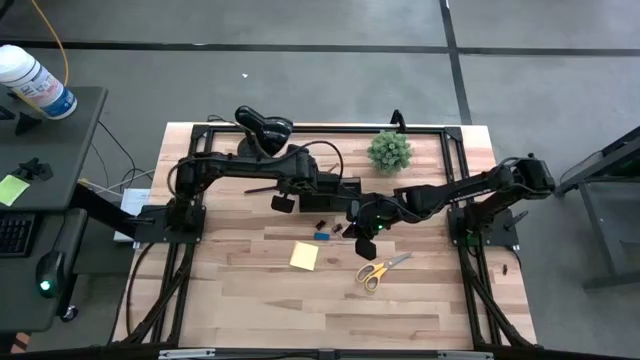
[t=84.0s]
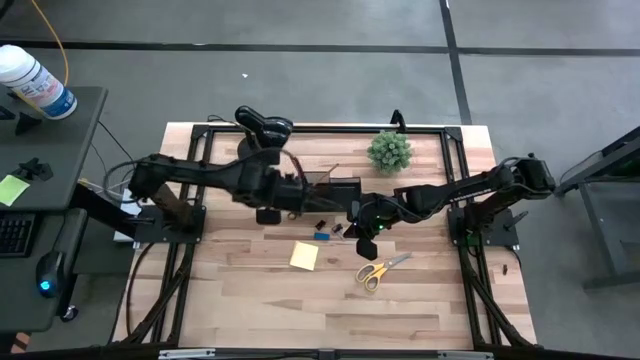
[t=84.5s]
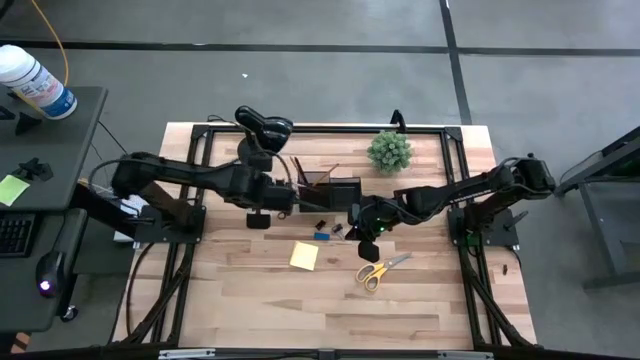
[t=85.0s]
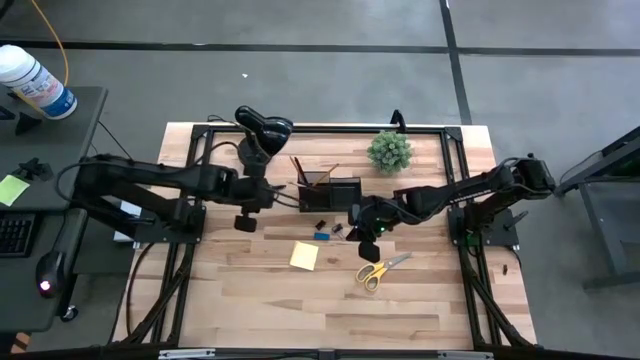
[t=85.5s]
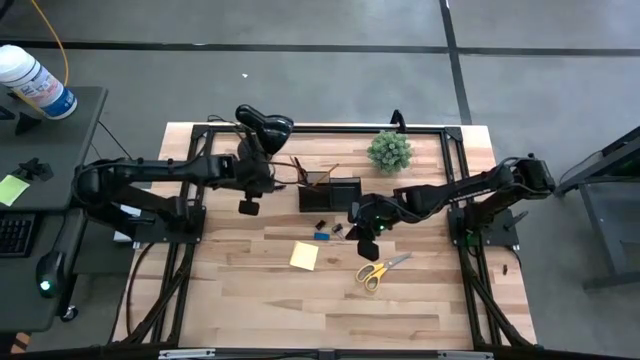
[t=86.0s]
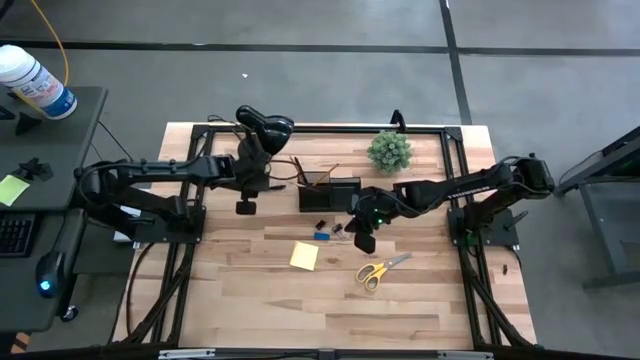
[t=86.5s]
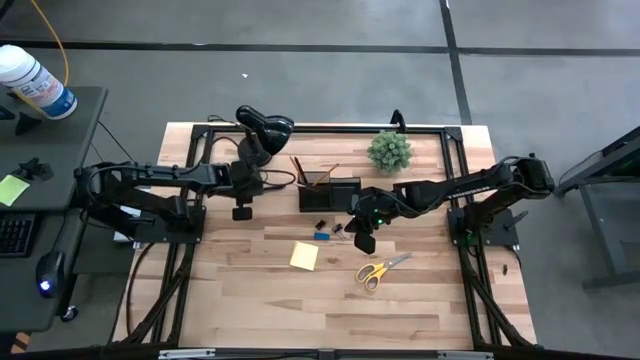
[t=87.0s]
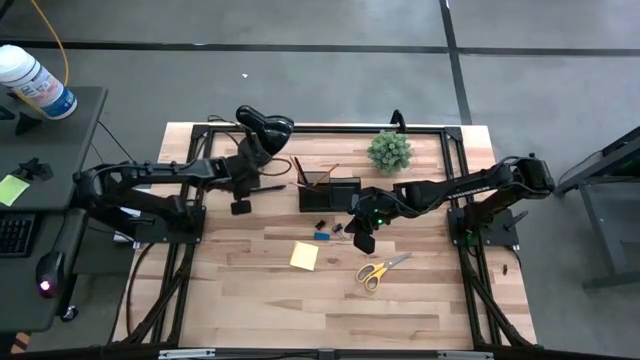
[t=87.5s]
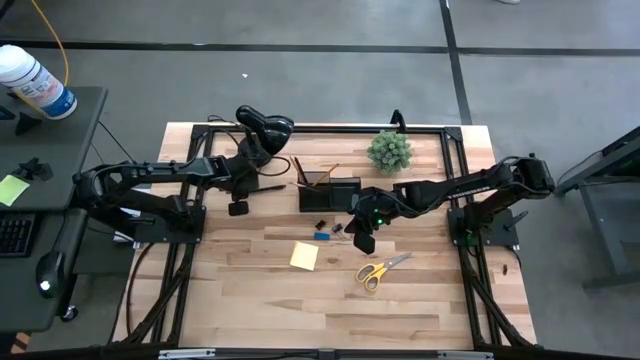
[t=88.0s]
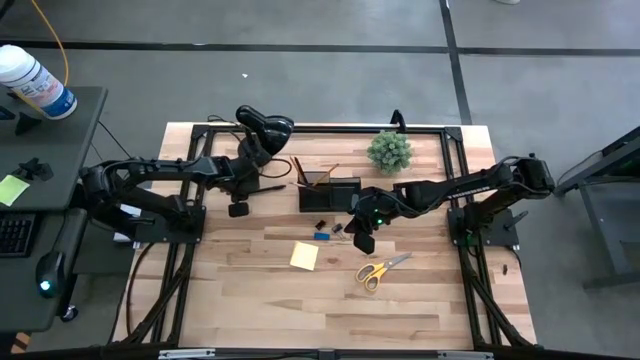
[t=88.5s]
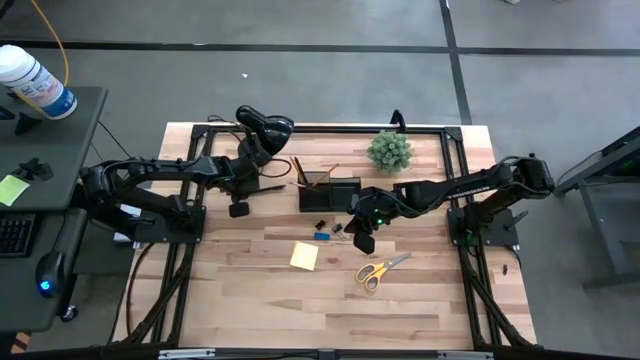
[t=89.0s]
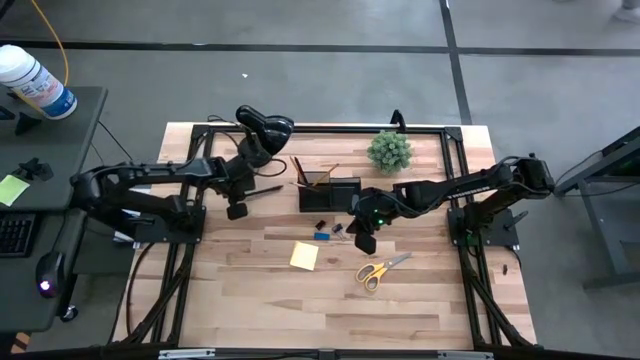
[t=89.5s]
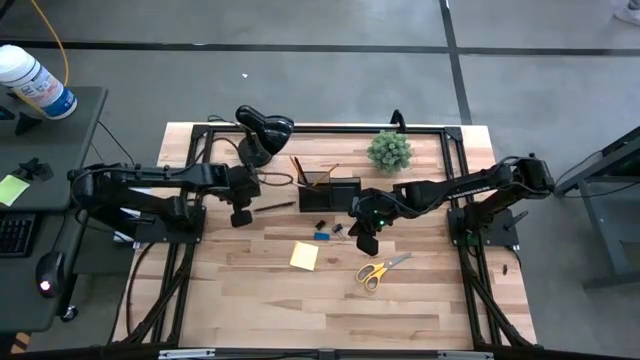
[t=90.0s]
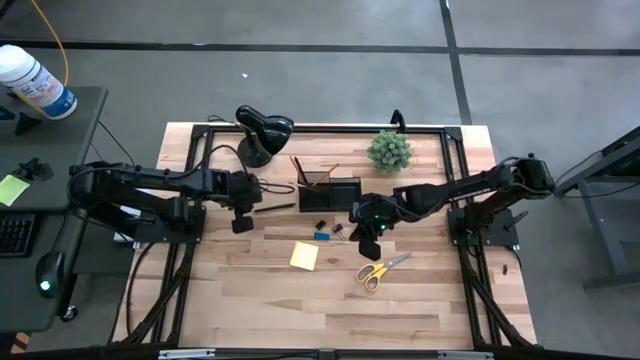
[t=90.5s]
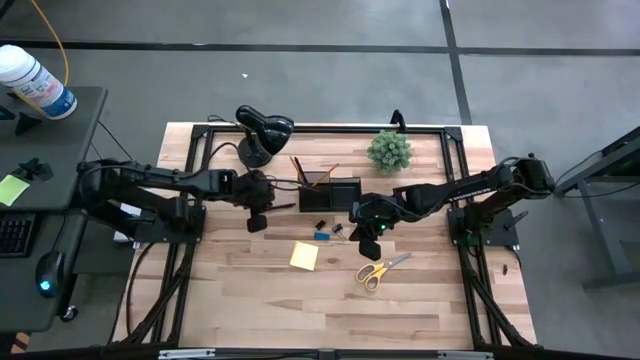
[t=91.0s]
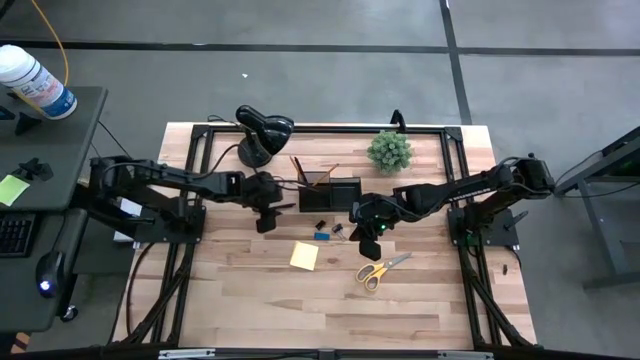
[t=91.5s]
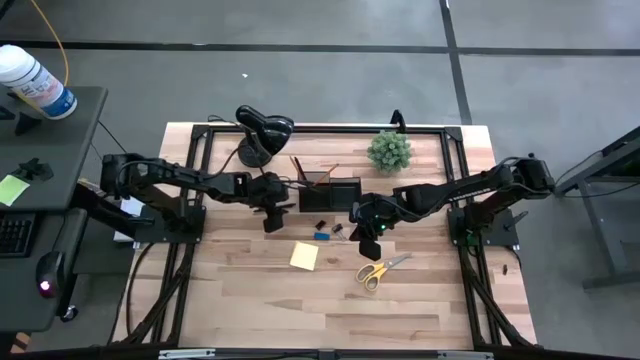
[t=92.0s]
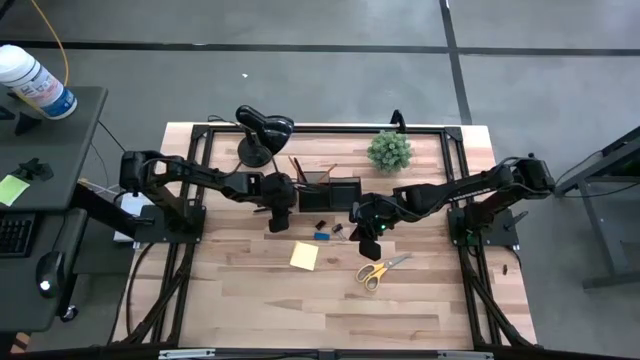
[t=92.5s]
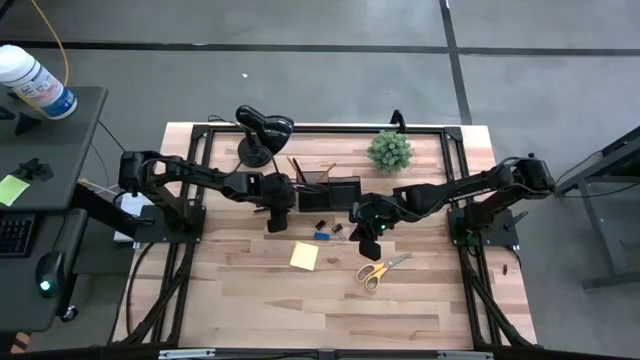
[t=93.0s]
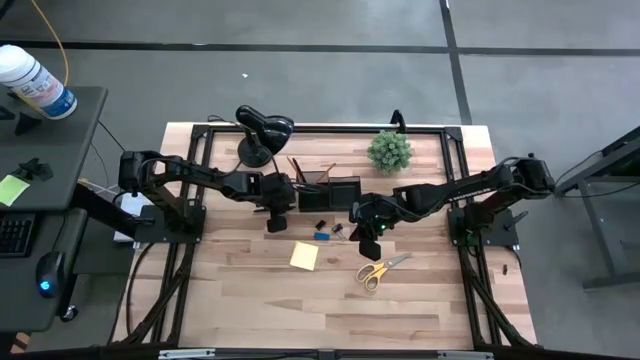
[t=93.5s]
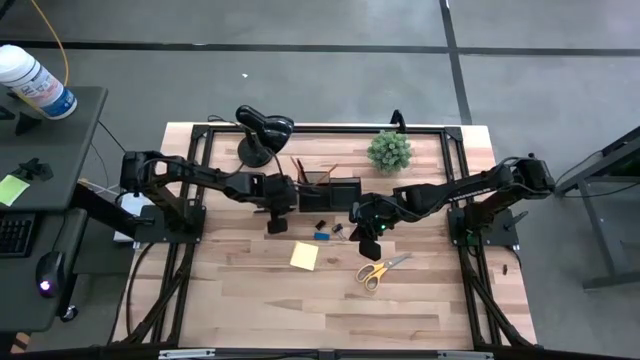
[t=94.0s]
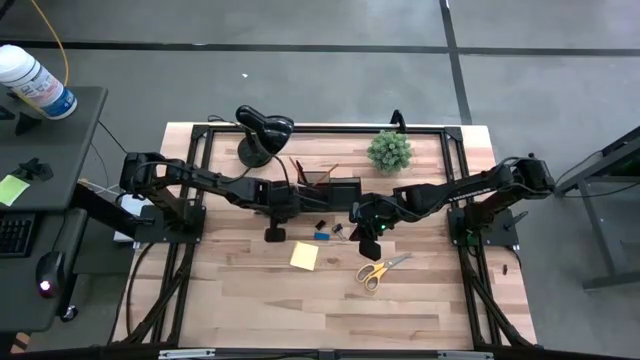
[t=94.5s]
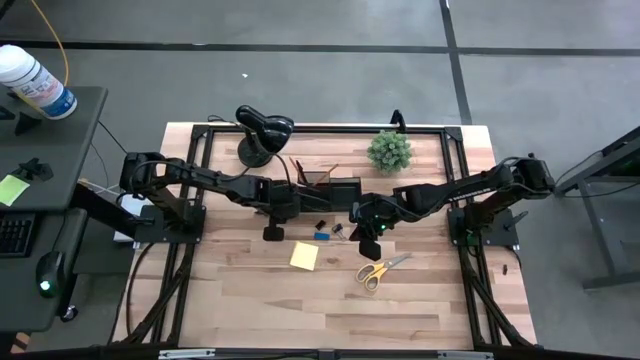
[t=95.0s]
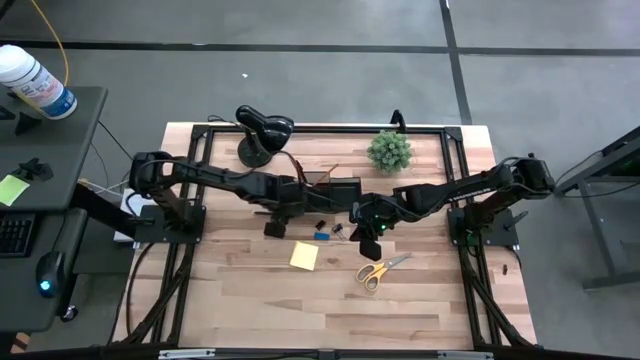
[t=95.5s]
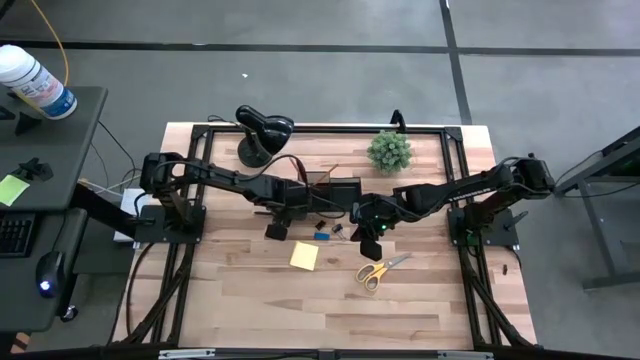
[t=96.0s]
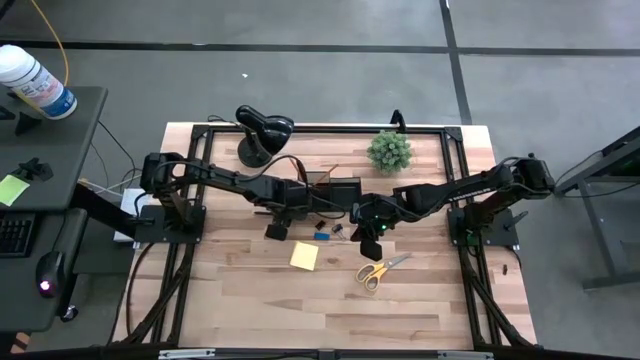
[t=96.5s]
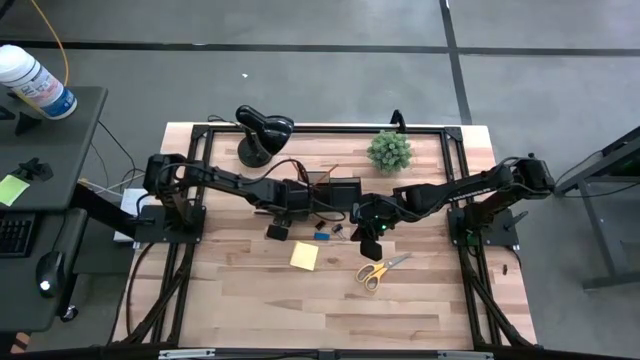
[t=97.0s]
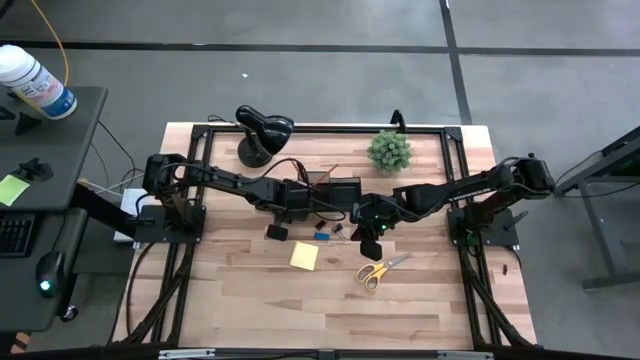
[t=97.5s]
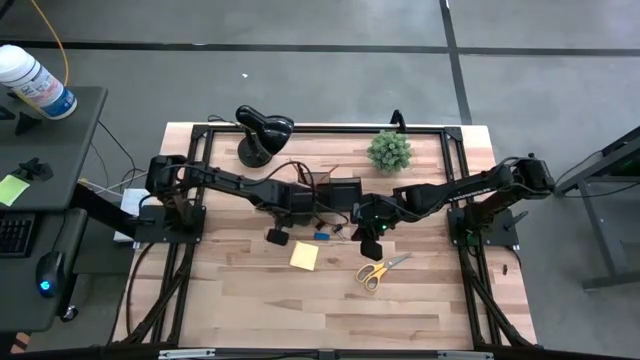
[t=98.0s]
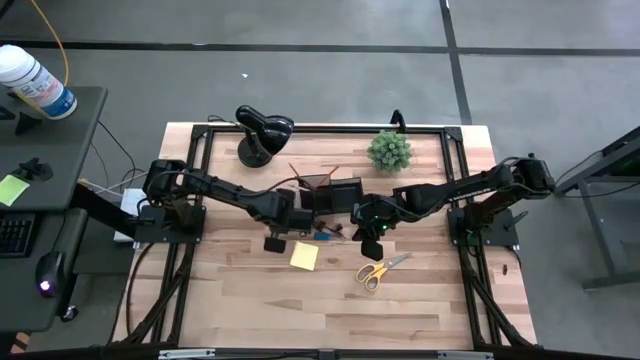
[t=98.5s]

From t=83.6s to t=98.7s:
Task: Pick and place office supplies into organizer
Put the black pen into the black desk organizer

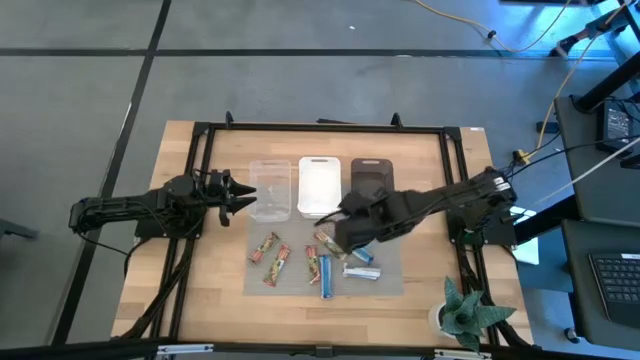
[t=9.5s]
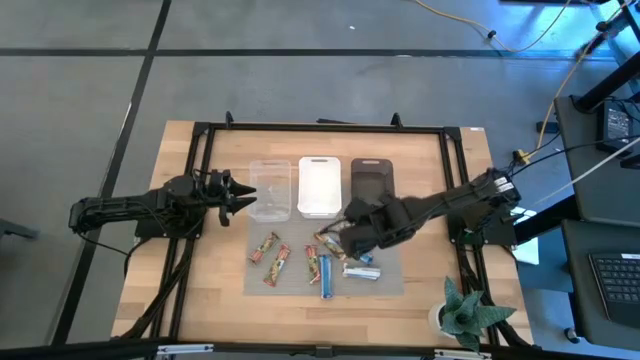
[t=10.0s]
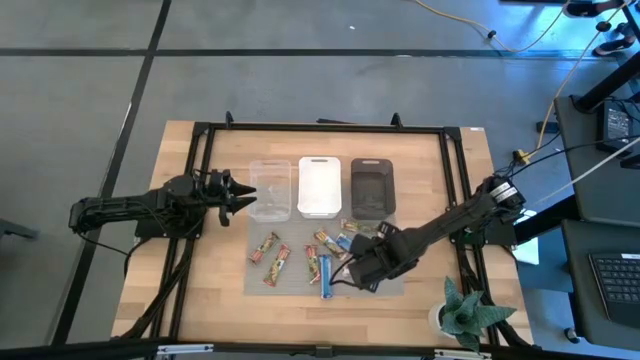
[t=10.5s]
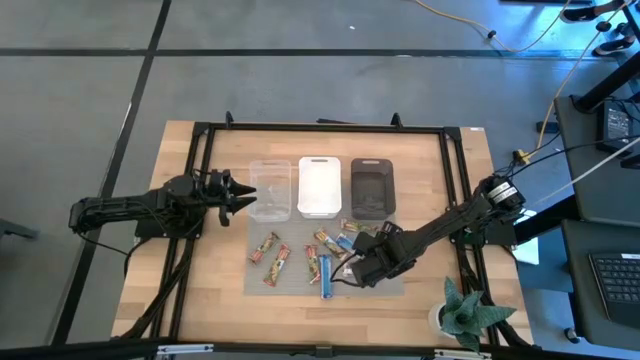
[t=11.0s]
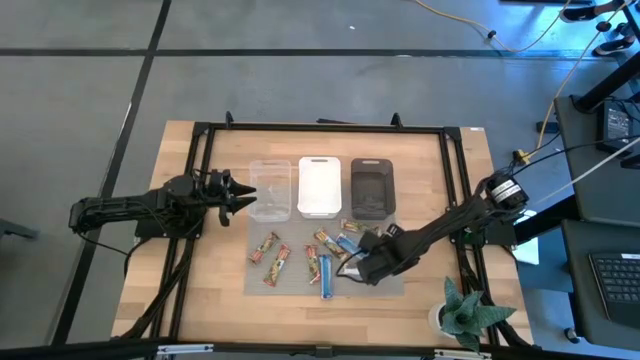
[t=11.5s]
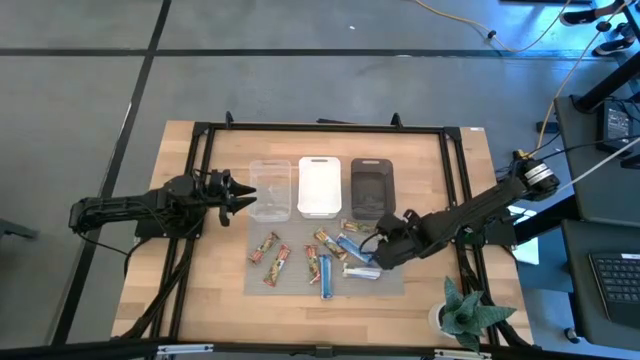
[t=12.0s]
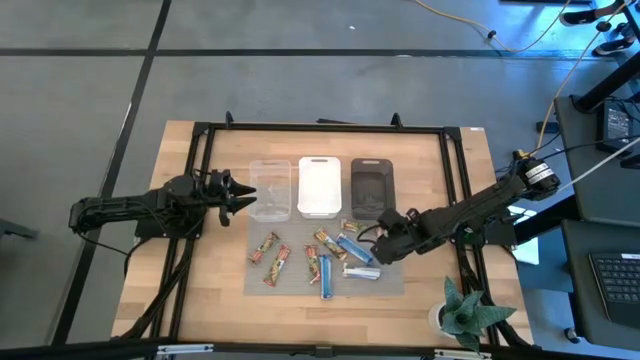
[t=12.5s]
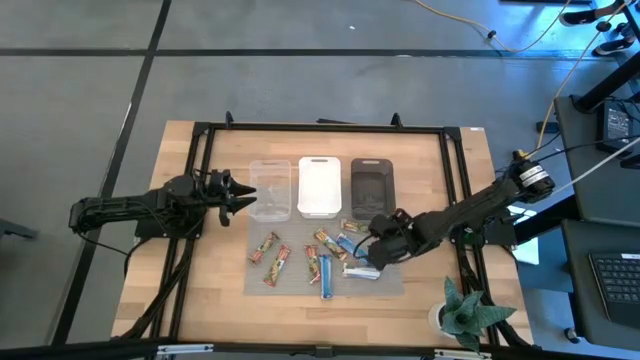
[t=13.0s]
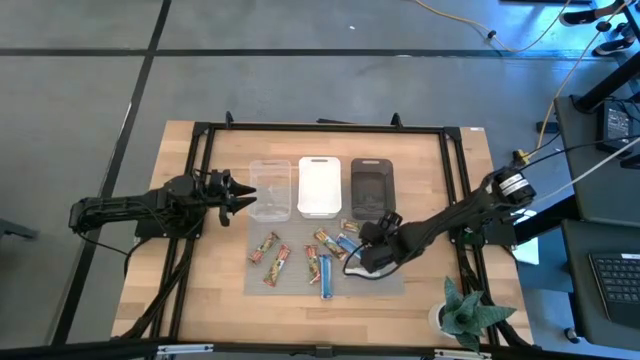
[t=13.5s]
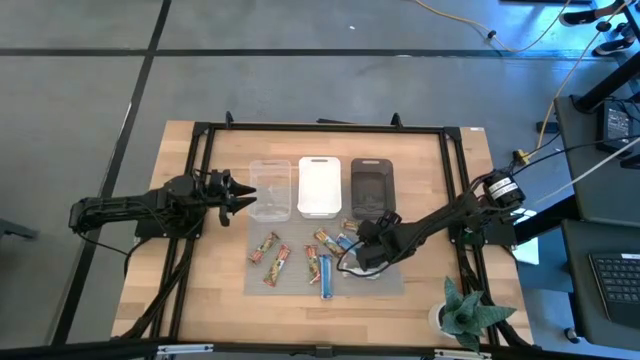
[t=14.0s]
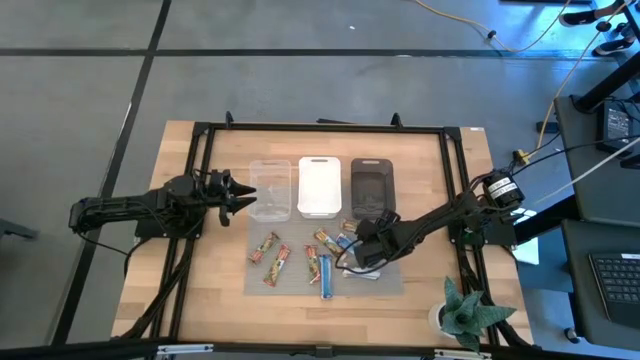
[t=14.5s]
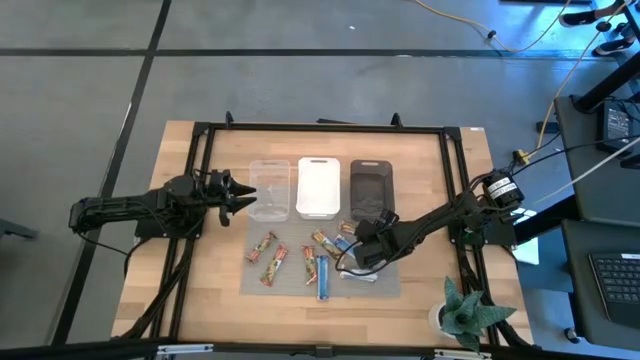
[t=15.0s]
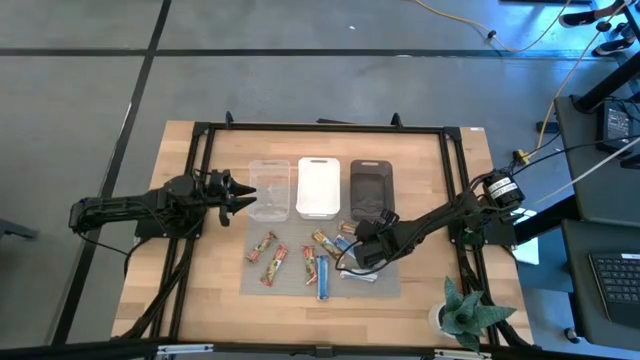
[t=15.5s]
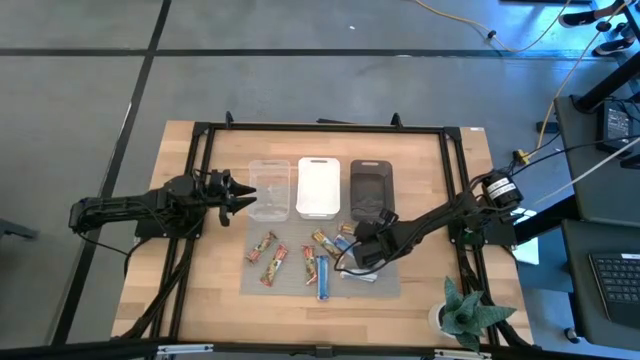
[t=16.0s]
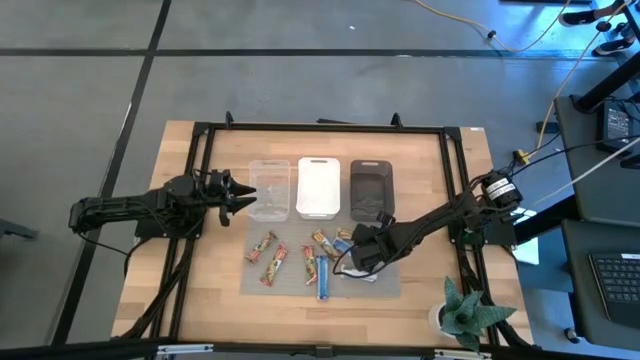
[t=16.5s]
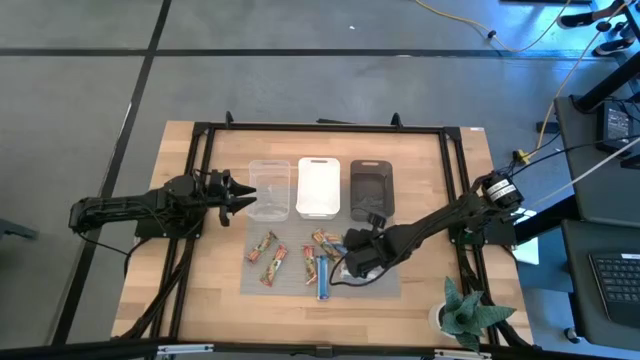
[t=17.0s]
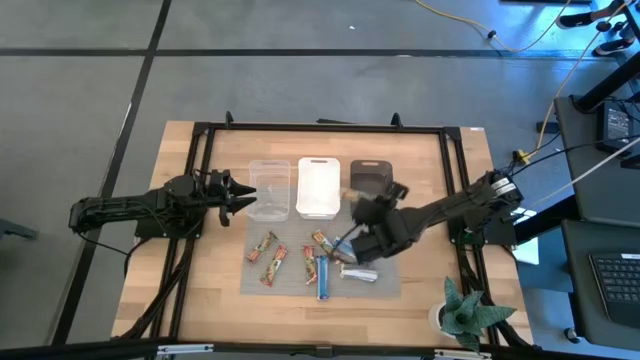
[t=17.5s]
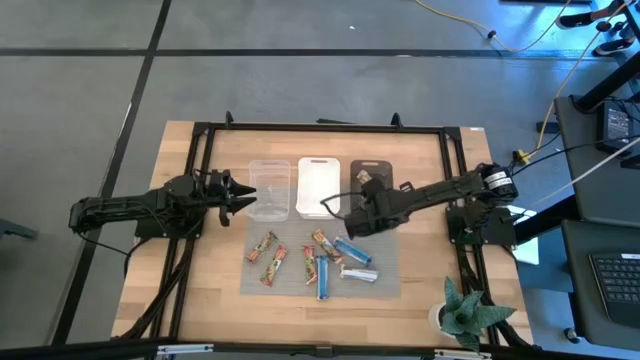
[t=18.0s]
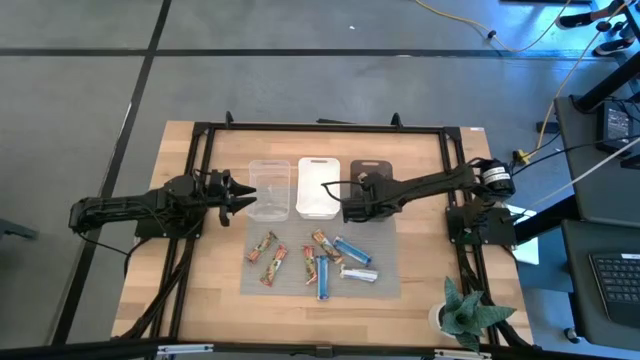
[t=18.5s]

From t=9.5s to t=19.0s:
Task: Pick and place Granola Bars by type
Put the top right yellow granola bar into the black bin
